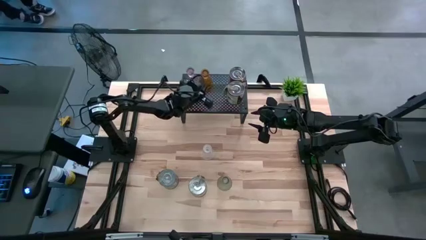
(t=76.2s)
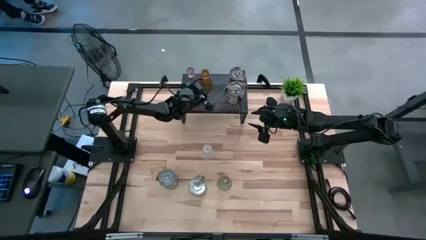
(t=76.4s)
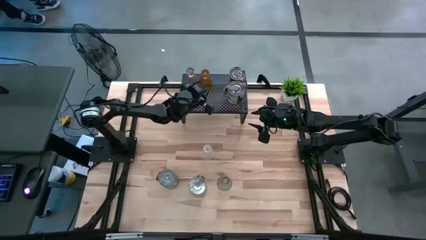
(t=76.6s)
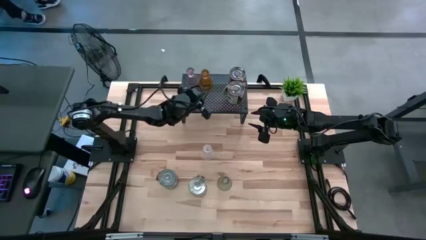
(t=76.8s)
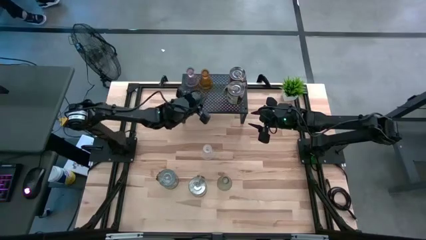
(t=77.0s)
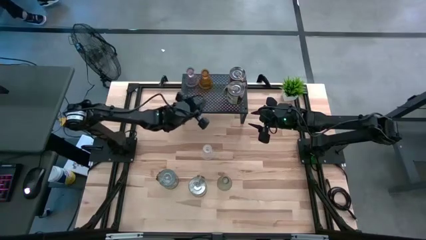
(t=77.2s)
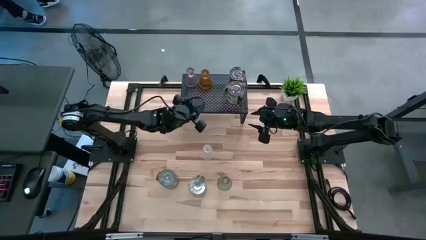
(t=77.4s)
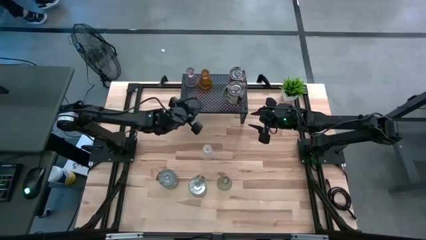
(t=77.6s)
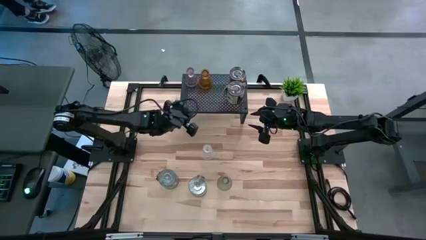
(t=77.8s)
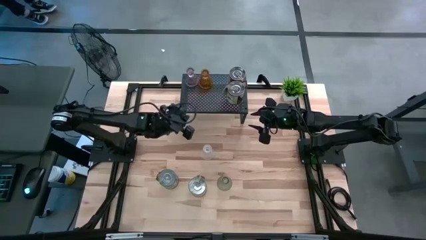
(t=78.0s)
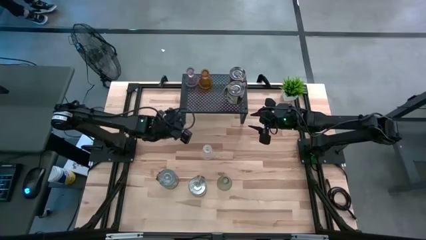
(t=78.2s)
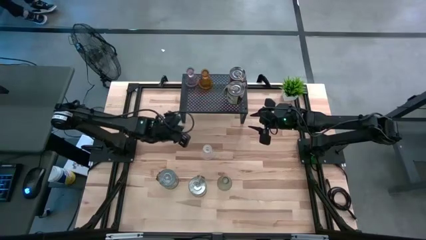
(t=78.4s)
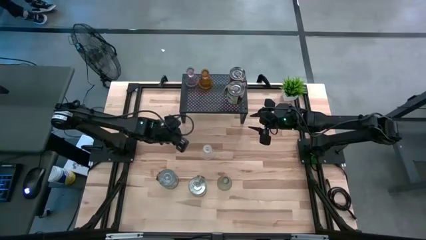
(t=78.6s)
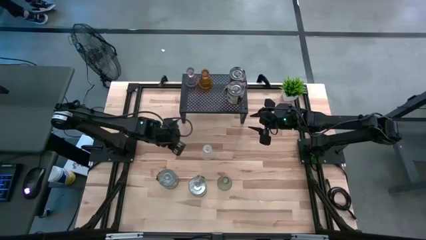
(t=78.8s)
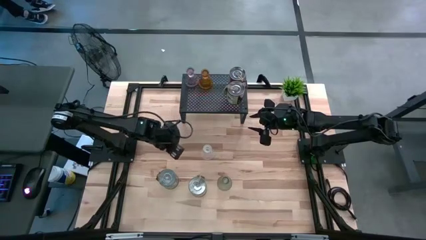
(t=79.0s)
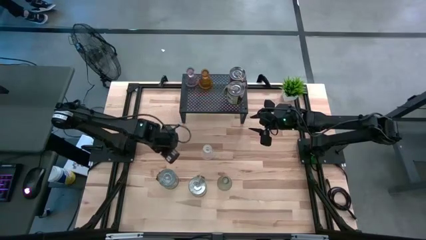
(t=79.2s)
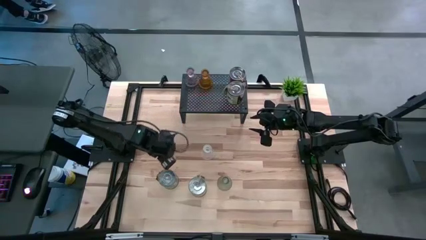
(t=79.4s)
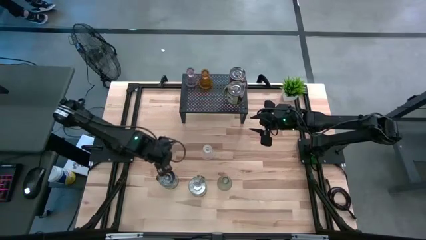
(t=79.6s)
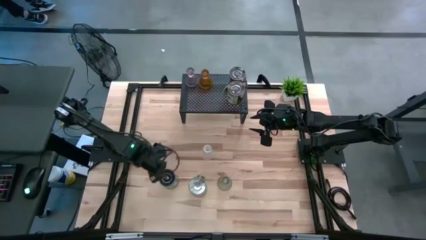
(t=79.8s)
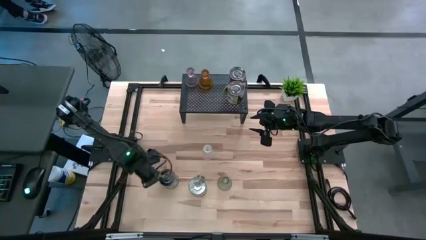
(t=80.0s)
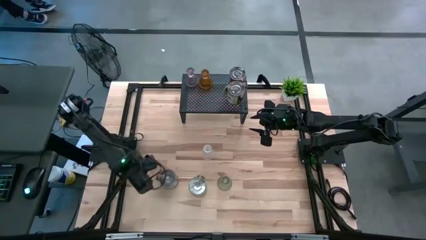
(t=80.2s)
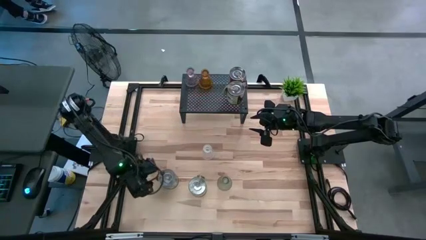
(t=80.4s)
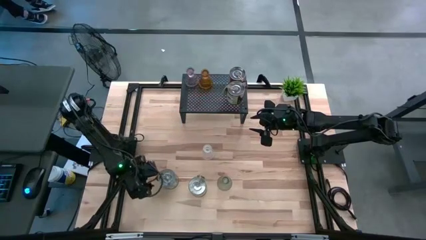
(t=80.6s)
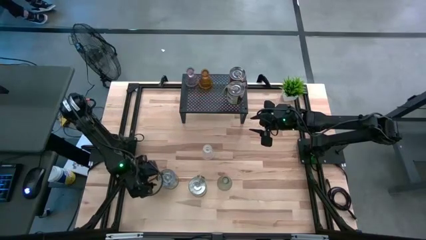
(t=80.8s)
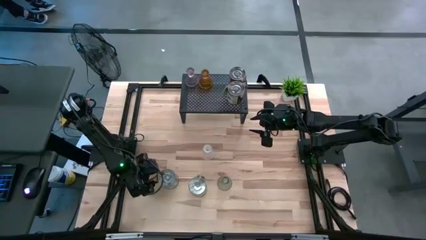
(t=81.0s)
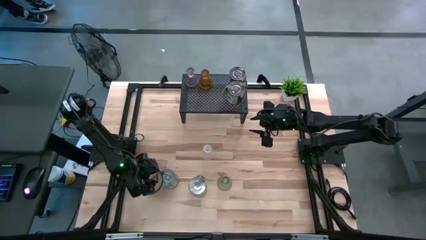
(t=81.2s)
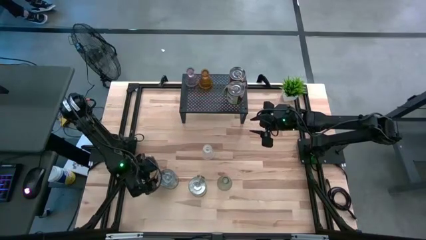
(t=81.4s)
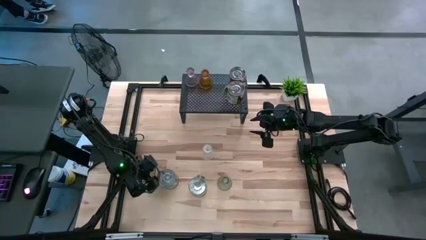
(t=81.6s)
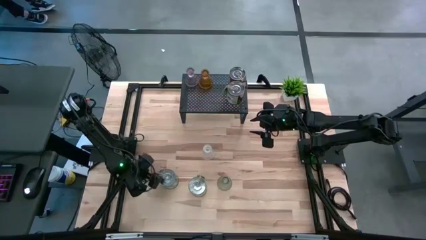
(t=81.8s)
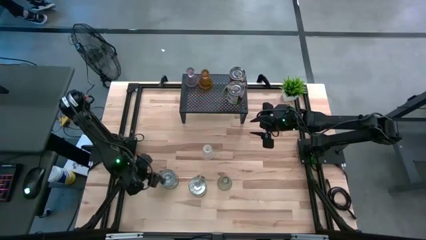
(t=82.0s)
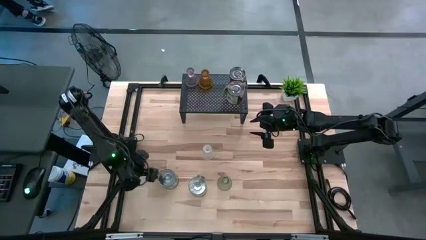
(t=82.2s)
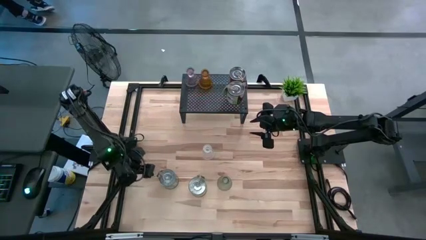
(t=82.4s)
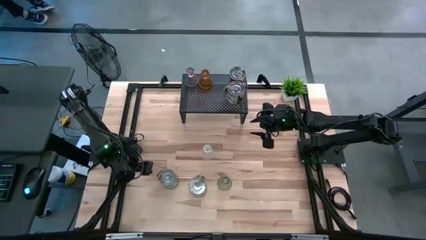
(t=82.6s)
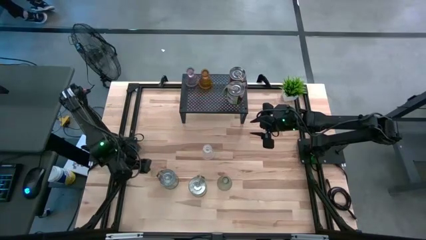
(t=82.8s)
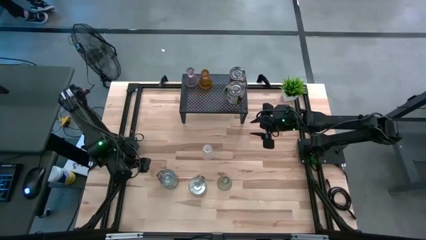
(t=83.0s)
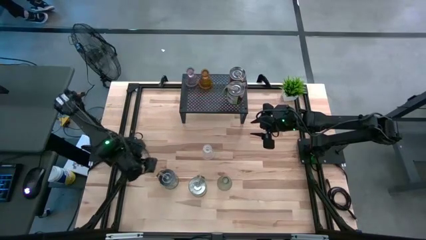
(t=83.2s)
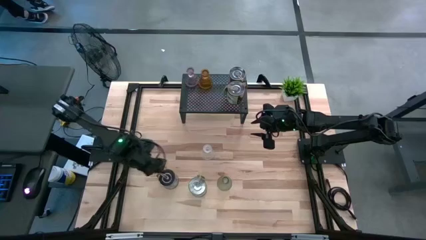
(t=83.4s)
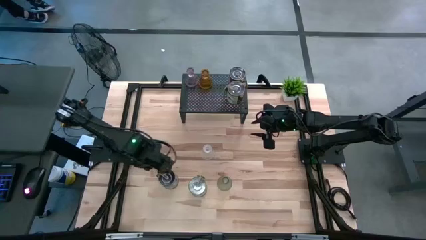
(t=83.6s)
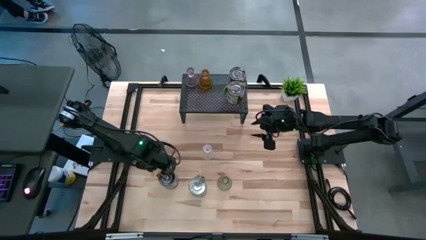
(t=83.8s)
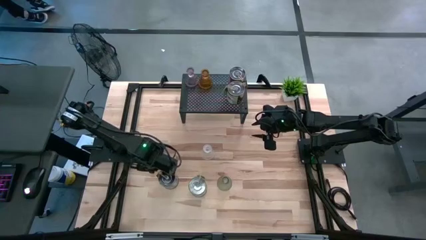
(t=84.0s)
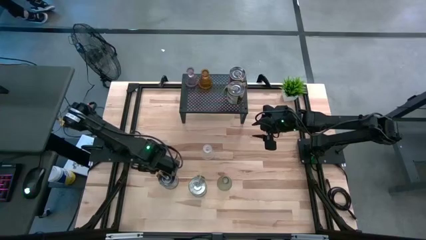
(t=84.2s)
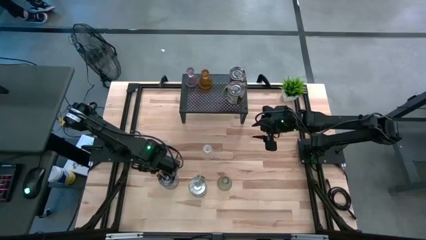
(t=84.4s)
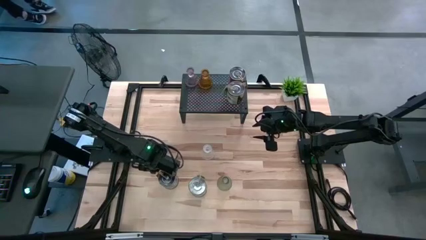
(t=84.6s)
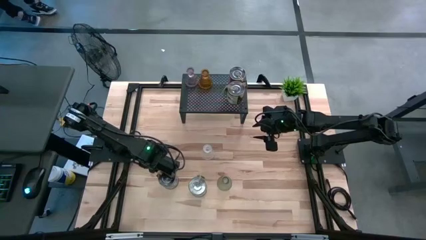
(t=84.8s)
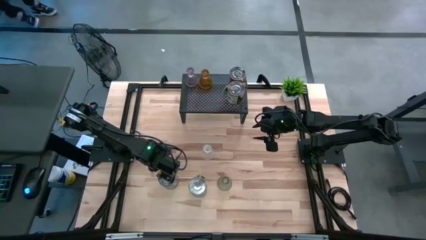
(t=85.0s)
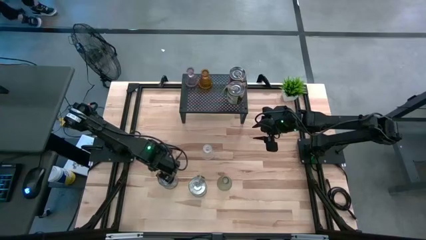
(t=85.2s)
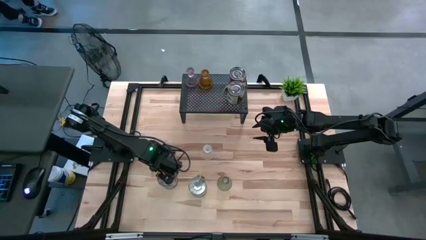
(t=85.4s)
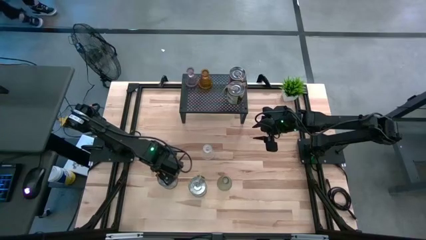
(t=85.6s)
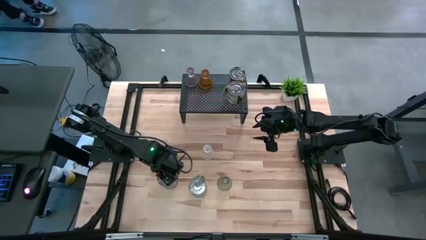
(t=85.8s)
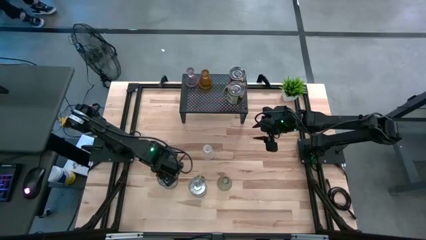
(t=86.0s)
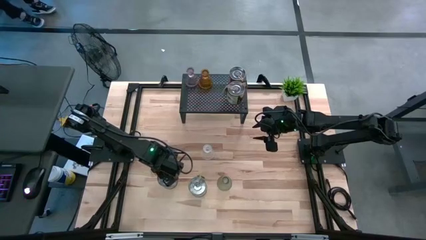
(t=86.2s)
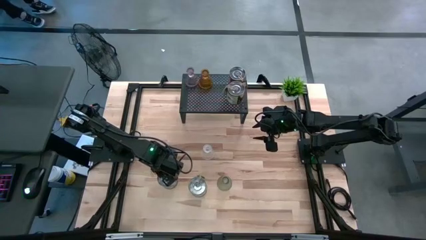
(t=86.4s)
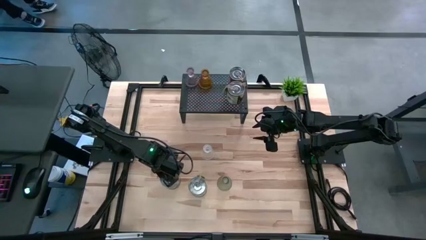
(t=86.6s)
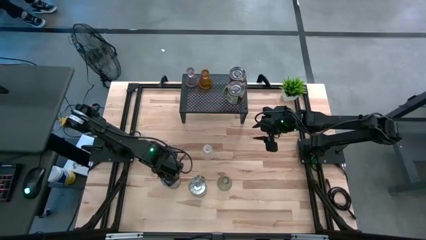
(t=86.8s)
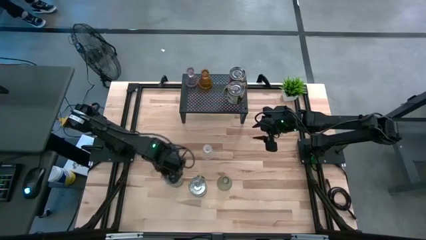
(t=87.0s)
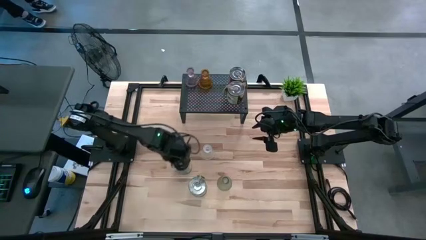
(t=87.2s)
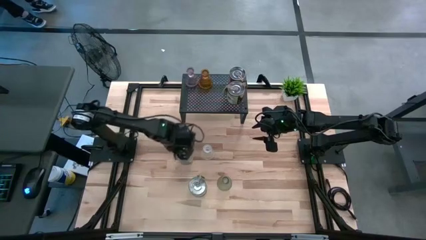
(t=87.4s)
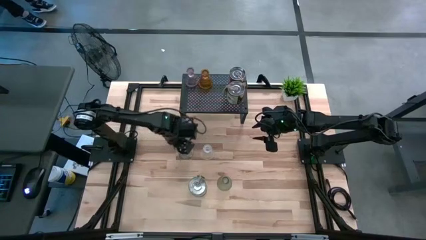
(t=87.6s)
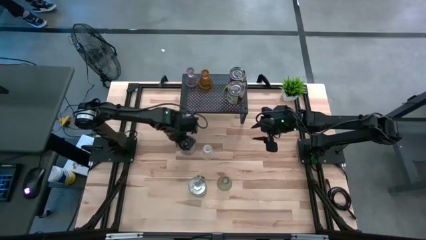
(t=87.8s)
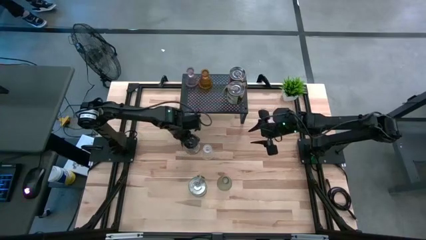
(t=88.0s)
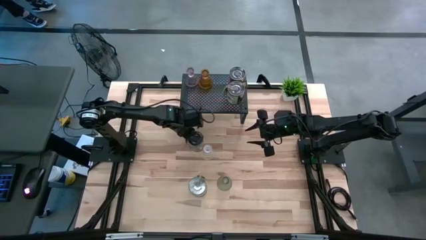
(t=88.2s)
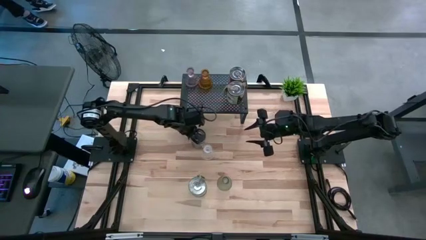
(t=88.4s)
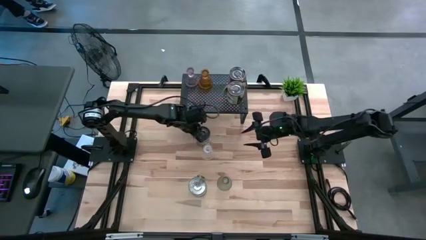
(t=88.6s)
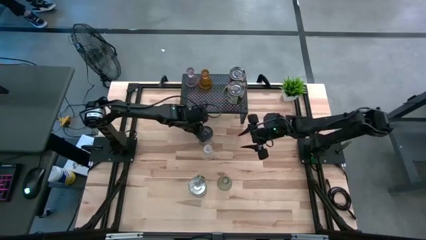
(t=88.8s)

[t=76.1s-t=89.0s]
Task: Pick & Place candle stick holders
Put the brown scented candle on the shelf aligned with the other scented candles
